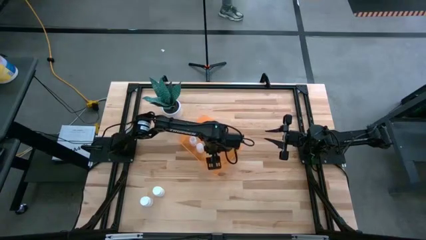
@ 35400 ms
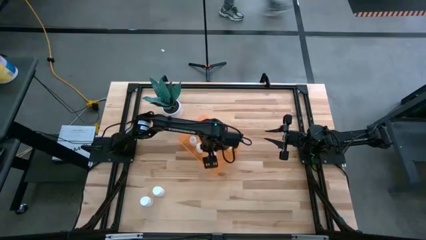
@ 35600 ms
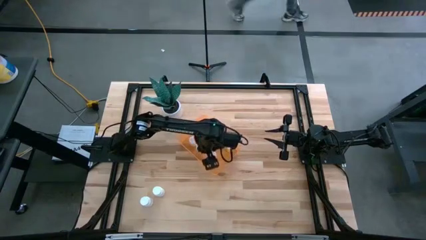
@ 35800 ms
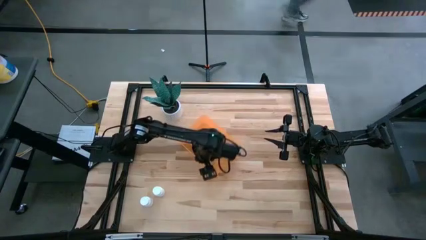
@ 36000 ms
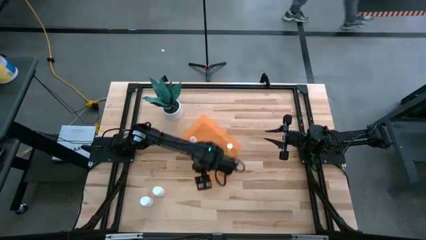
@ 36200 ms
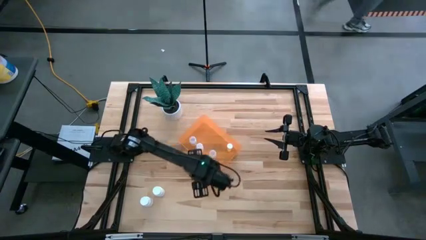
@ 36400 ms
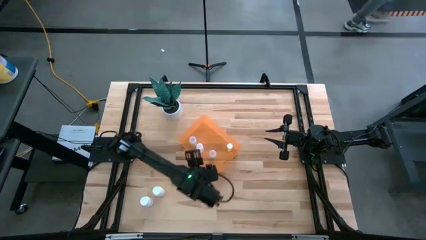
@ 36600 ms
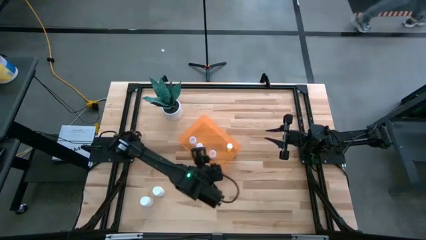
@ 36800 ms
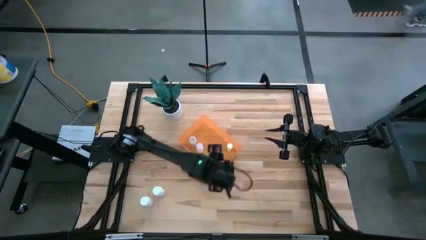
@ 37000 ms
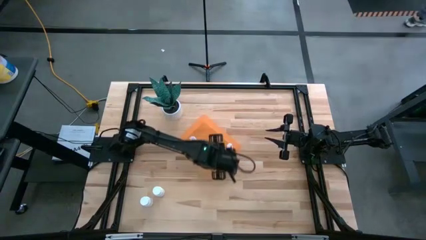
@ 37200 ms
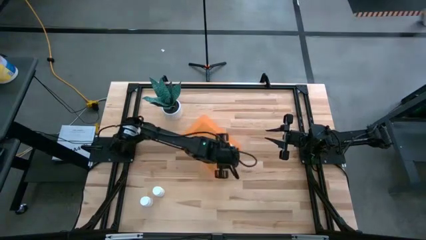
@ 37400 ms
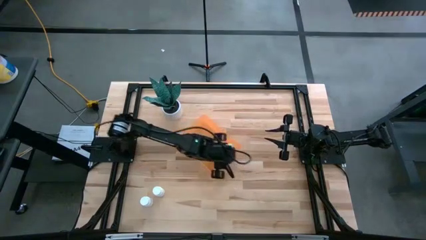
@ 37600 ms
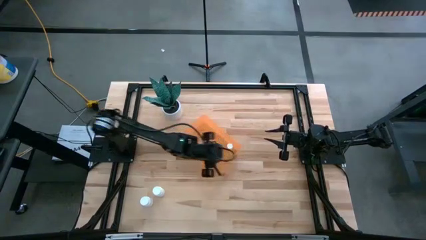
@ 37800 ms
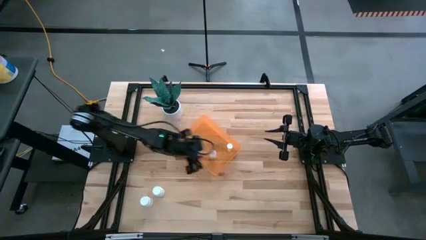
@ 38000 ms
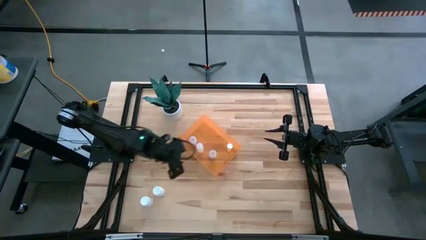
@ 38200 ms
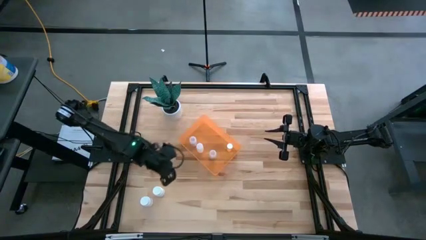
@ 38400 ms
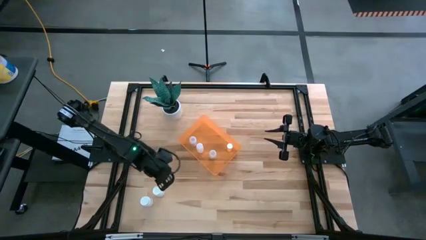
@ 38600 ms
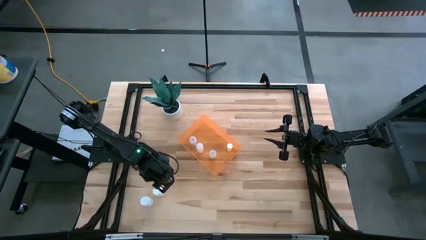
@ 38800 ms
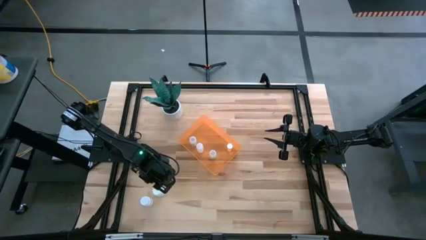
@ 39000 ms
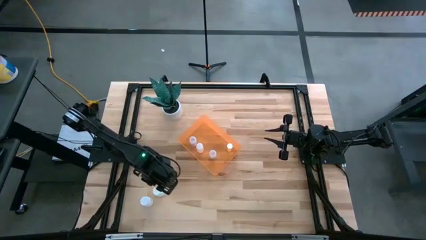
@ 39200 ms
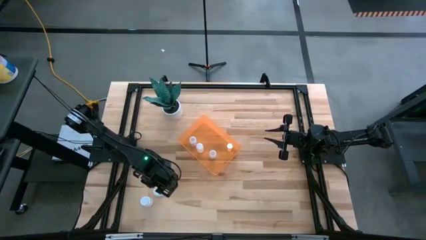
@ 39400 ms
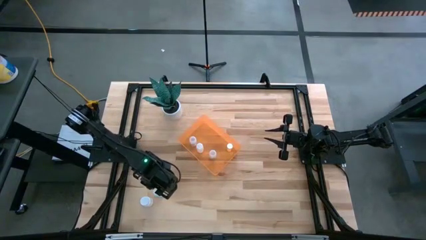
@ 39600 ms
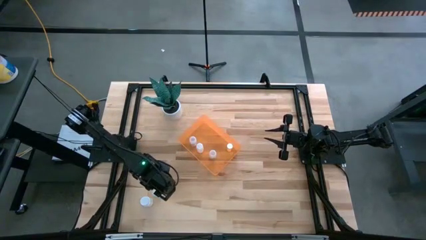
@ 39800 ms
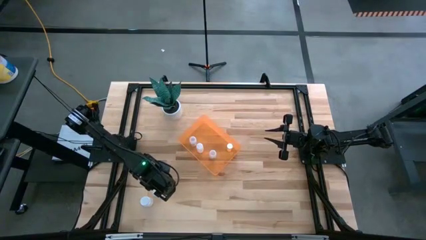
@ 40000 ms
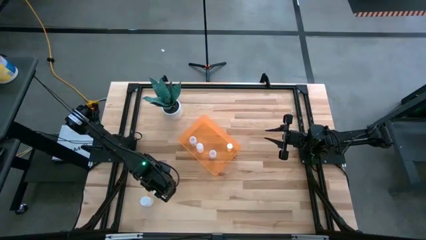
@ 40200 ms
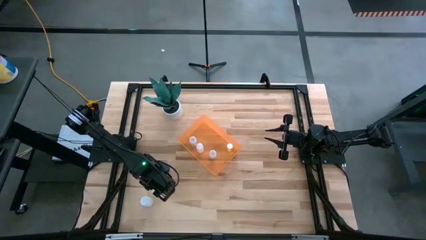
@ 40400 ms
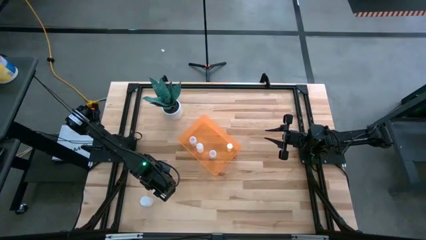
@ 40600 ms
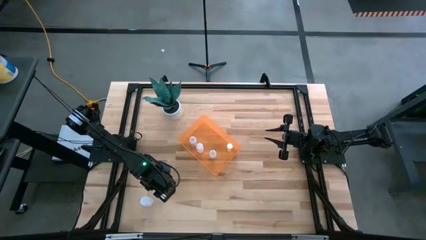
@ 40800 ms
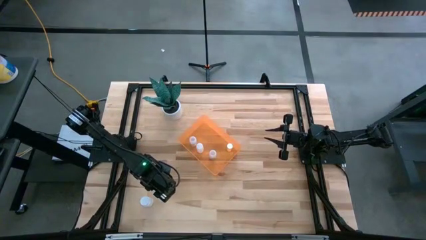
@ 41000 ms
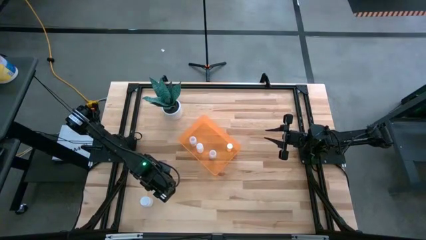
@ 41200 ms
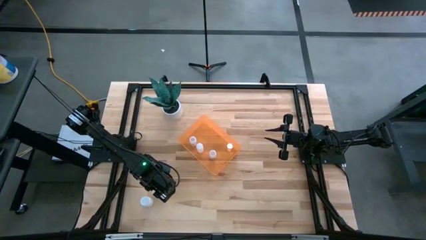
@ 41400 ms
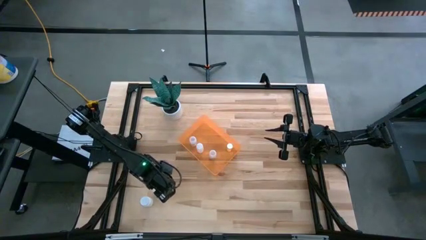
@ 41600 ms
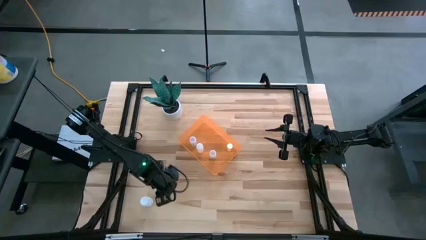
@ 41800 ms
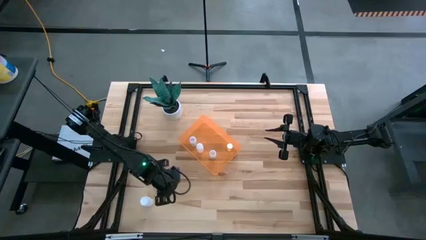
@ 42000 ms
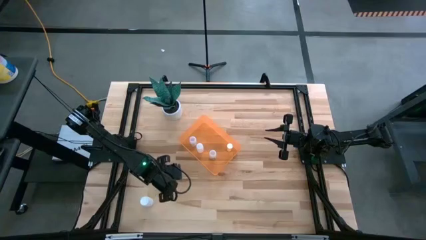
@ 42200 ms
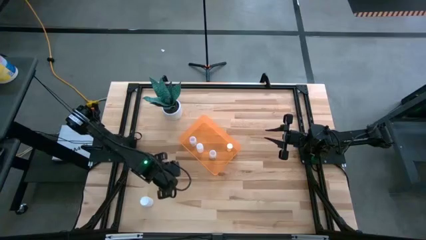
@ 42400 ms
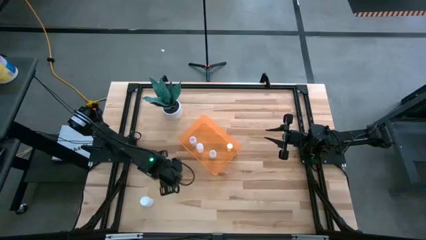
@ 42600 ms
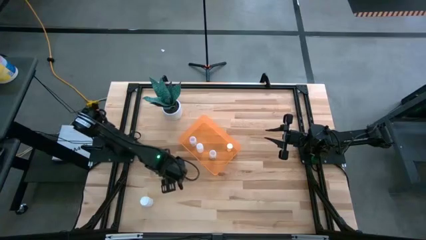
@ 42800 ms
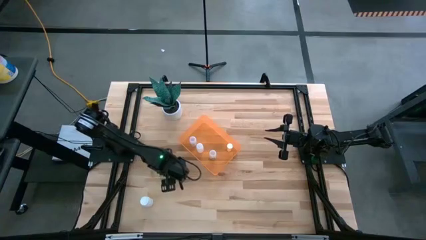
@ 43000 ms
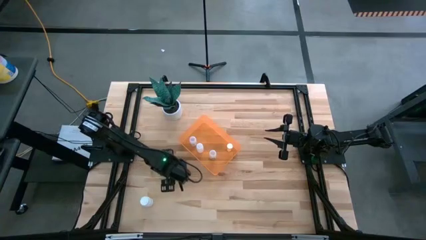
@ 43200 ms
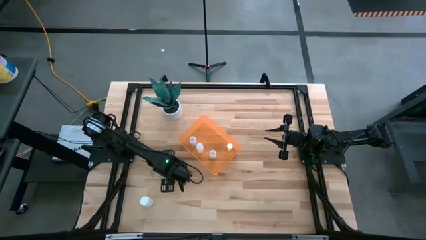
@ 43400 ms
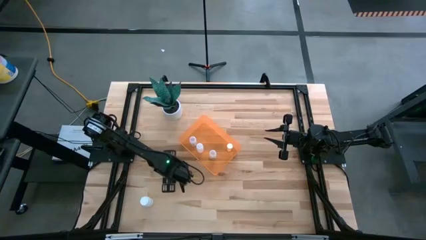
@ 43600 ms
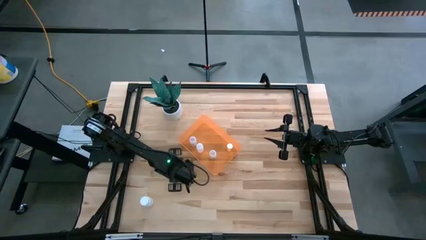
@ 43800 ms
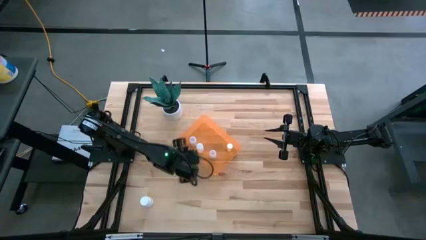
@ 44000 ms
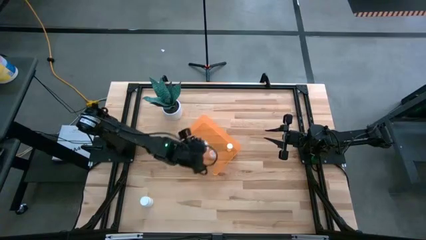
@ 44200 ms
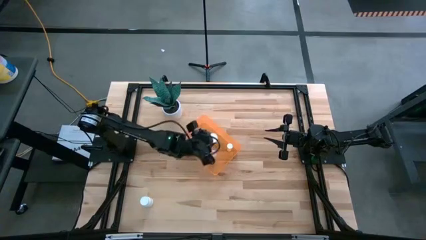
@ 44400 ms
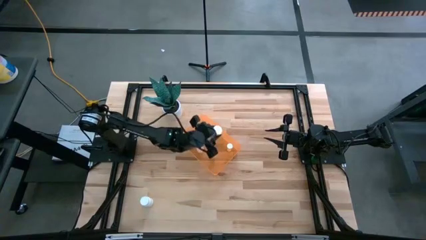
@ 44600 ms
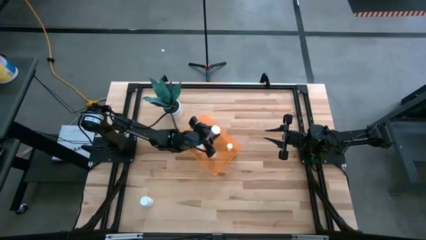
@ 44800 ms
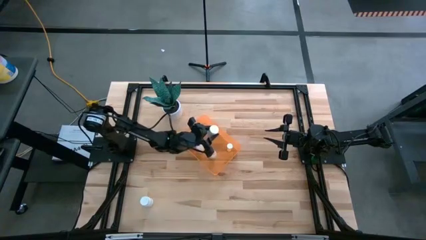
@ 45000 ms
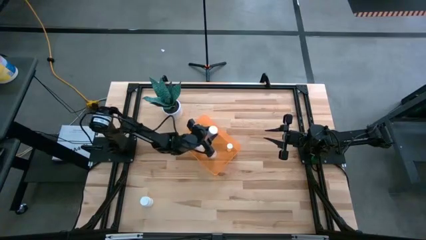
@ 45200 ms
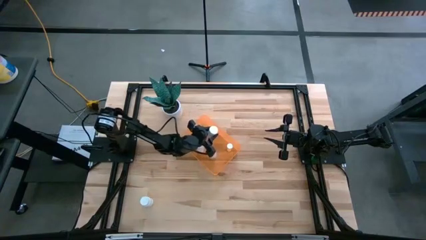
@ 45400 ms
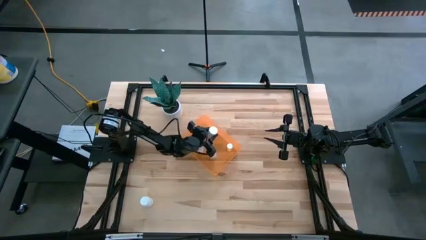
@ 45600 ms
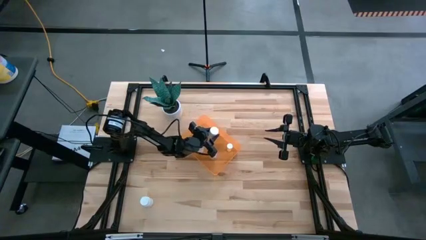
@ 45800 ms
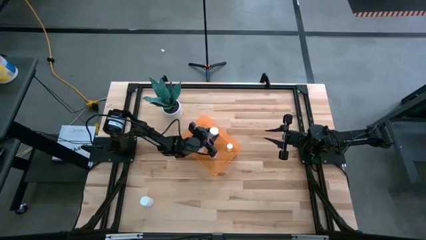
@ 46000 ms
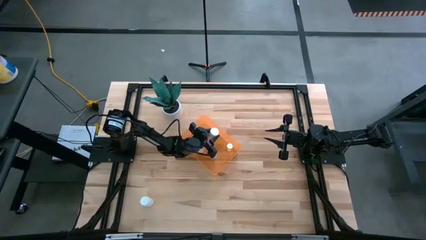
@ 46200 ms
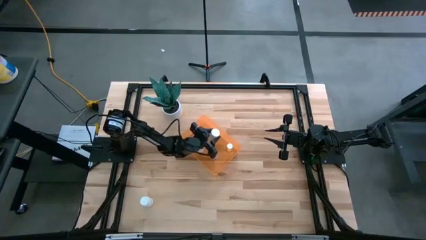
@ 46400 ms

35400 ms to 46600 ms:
Task: Pick and place pill bottles into a basket
Put the top white bottle into the orange container

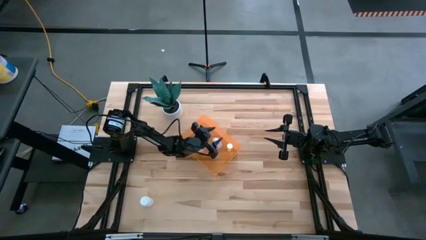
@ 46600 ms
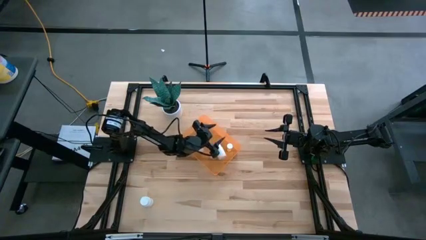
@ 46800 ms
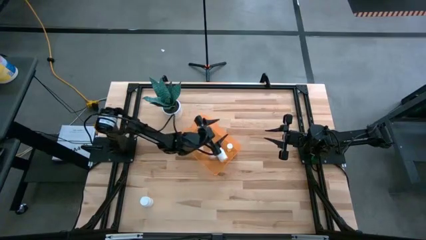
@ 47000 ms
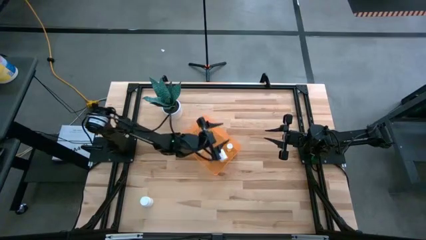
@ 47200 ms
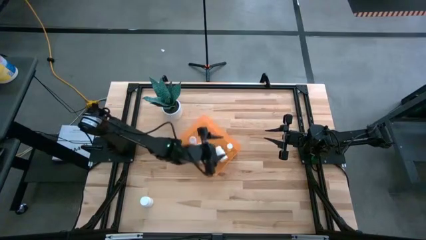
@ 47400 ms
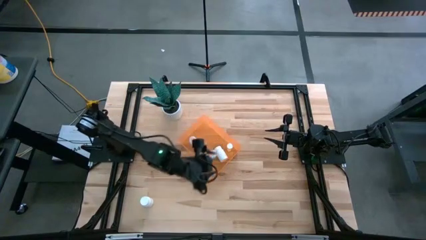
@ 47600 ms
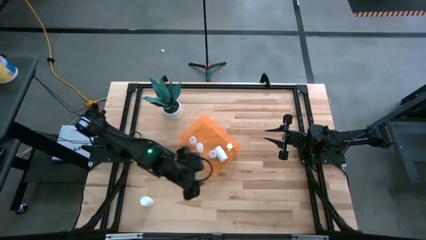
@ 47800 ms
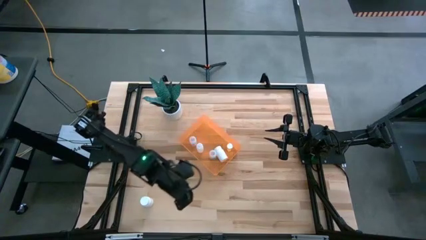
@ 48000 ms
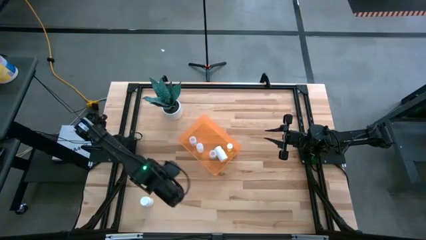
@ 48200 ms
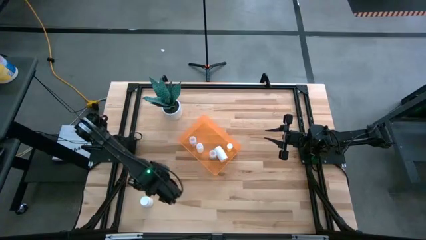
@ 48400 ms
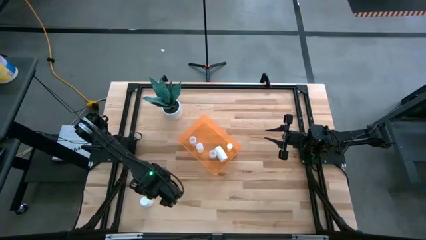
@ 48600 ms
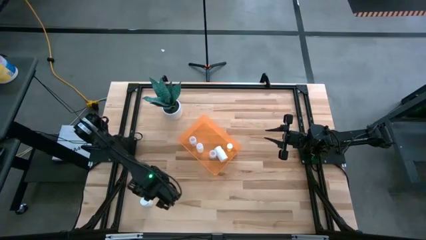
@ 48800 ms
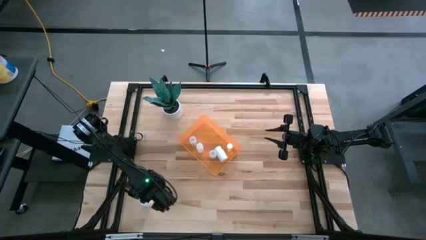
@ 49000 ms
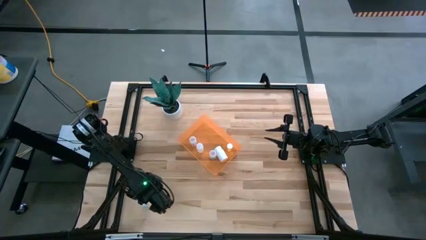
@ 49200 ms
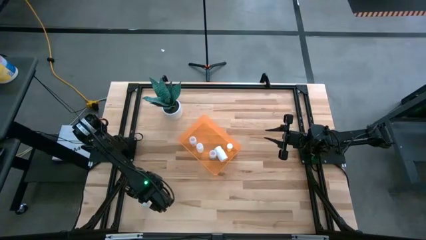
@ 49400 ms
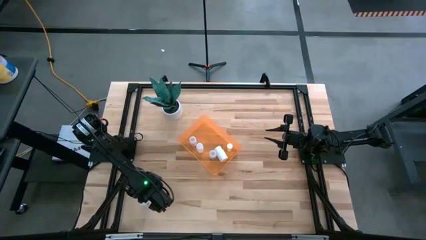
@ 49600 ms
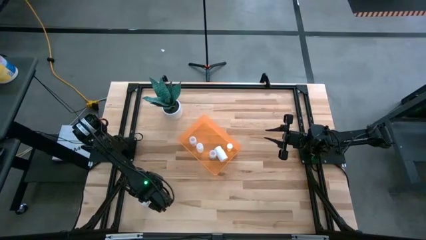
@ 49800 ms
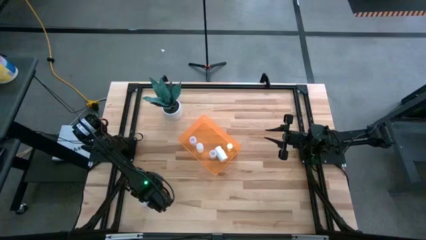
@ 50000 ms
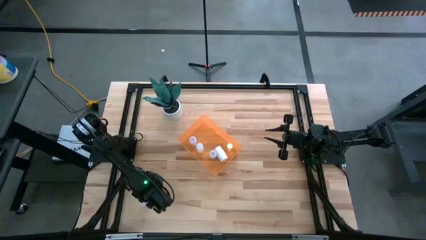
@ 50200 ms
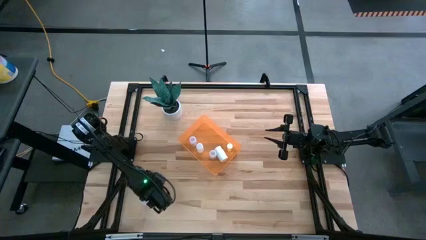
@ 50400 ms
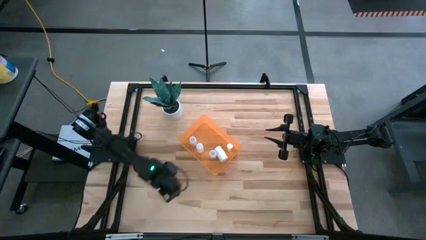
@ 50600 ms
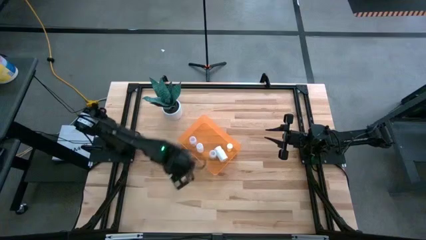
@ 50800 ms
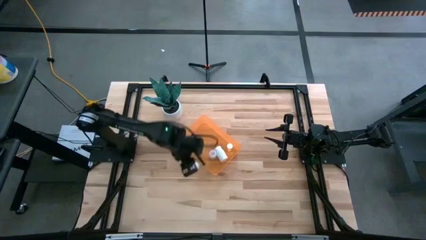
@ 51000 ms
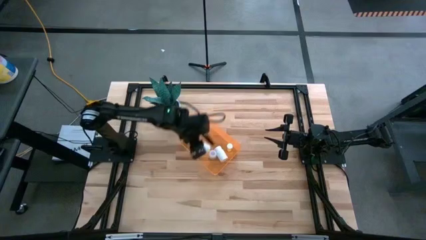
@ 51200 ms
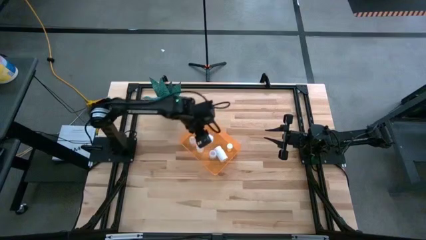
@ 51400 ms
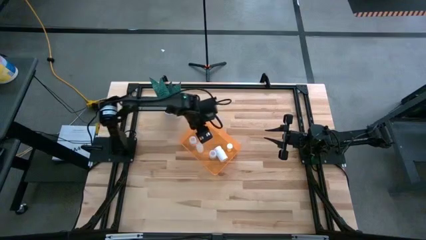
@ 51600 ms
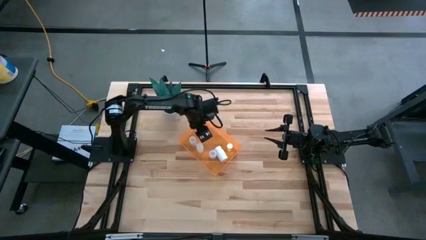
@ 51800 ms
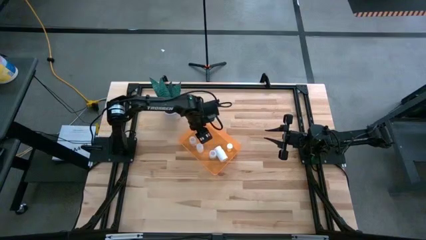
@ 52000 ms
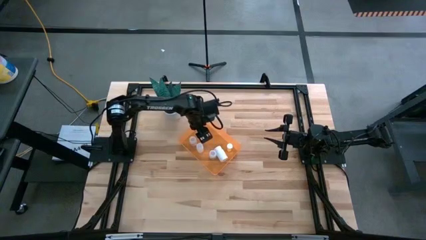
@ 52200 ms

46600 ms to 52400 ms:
Put the white bottle into the orange container
